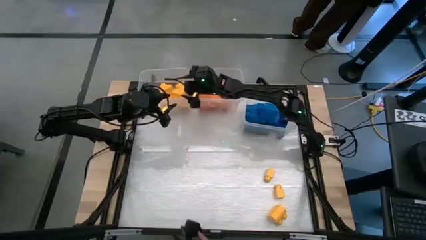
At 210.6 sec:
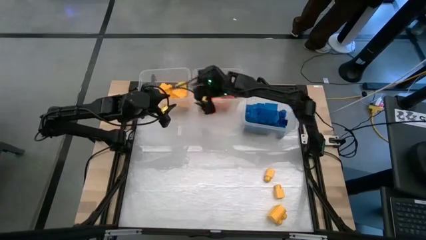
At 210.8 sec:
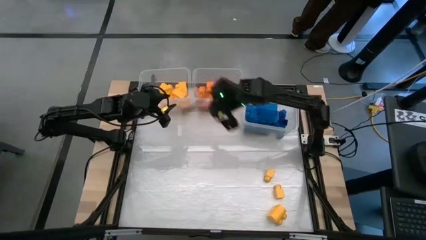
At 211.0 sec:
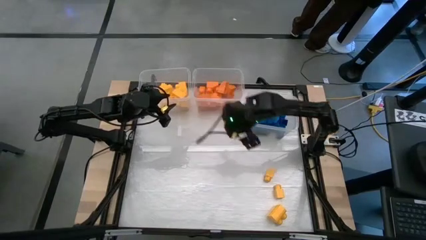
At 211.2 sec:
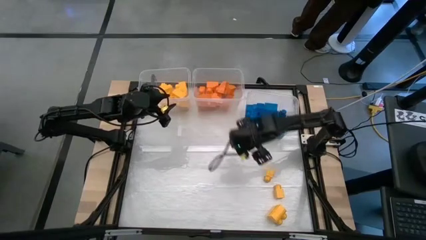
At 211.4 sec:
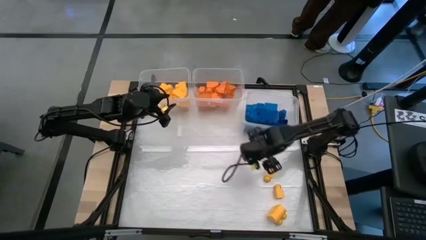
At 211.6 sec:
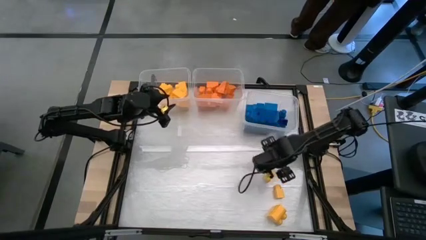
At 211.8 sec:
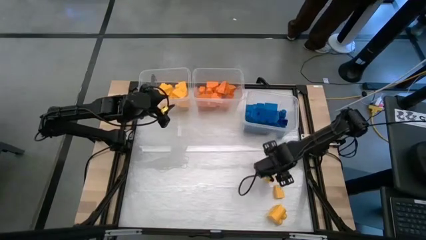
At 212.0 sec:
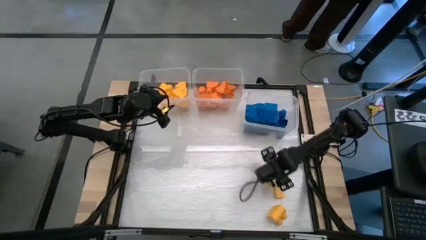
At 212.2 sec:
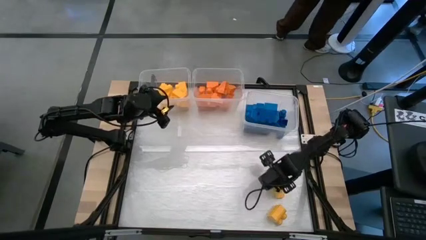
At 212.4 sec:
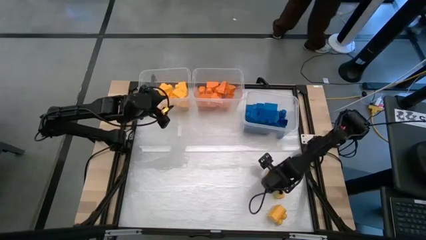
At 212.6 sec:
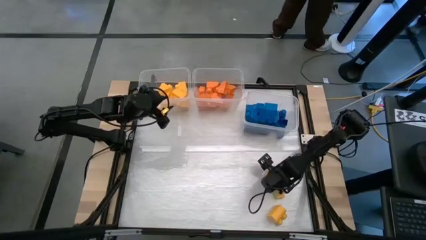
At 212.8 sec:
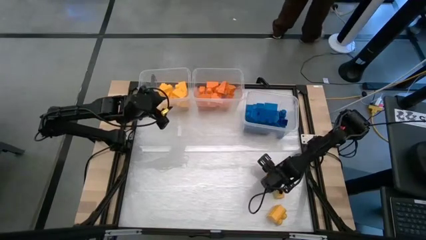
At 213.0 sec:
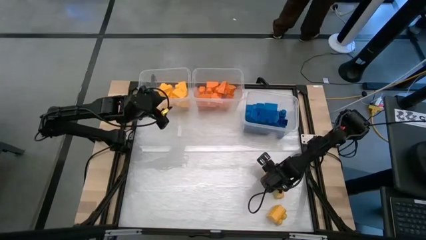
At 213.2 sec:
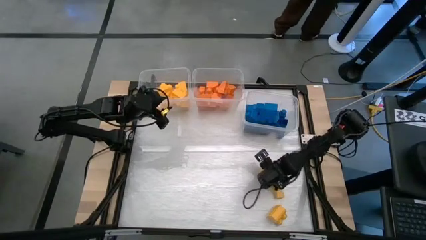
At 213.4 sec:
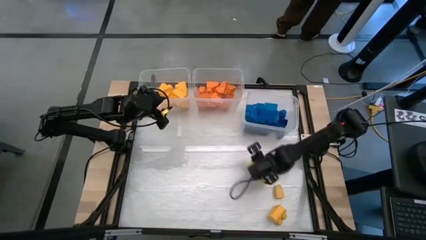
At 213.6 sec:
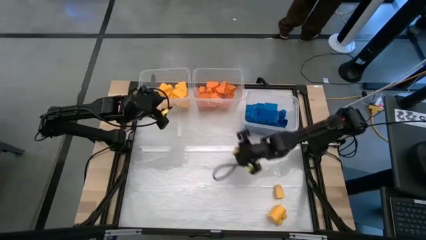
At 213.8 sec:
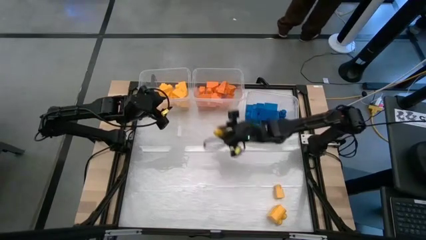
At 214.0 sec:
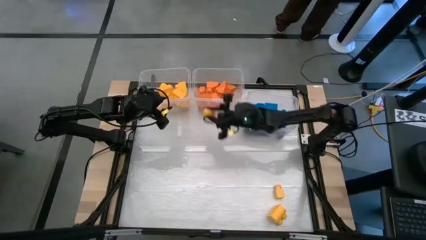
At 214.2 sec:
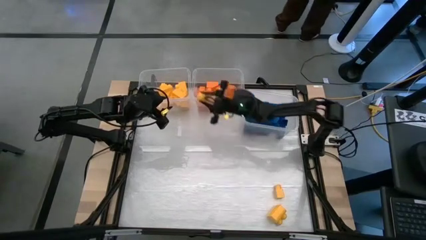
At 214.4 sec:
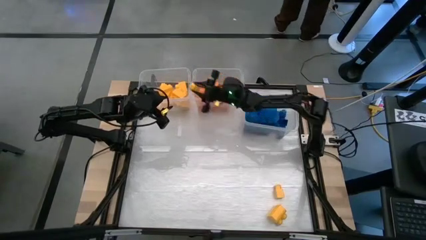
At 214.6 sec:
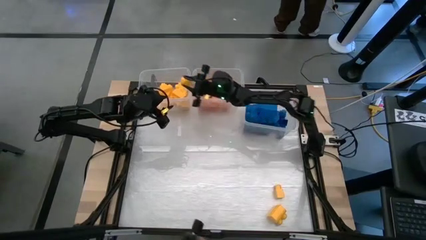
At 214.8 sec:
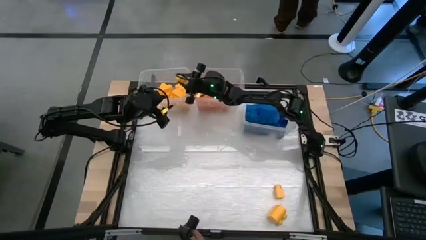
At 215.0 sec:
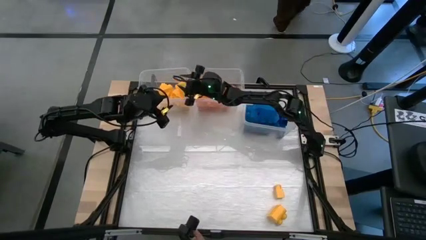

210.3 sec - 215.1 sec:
Task: Sort blocks
Put the yellow game piece into the left transparent bin

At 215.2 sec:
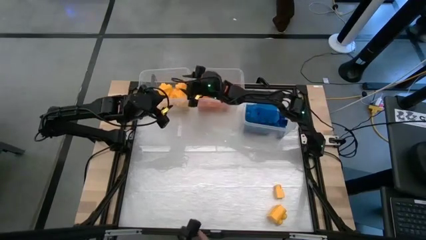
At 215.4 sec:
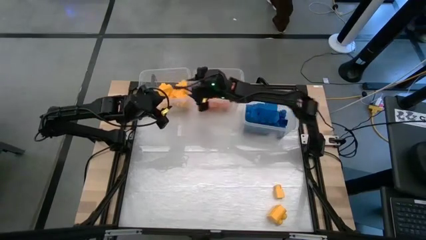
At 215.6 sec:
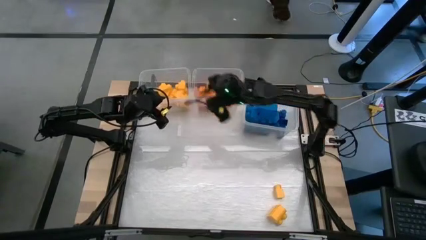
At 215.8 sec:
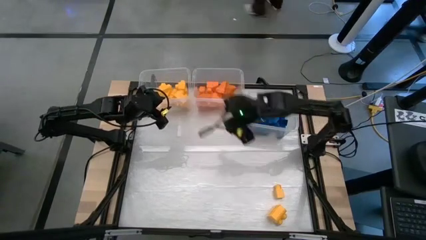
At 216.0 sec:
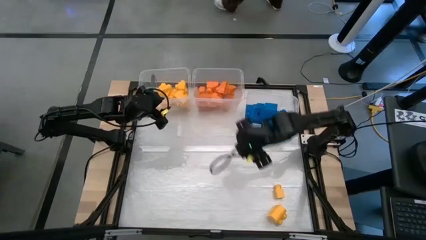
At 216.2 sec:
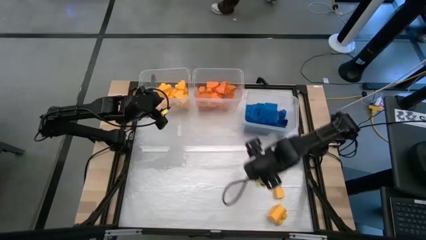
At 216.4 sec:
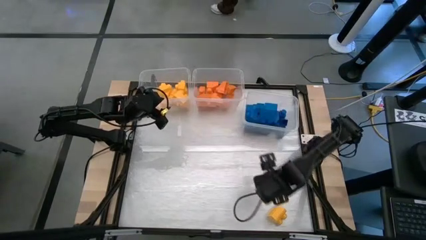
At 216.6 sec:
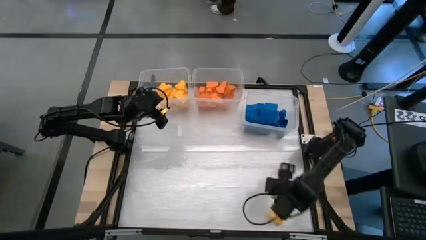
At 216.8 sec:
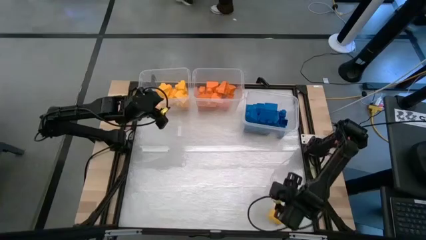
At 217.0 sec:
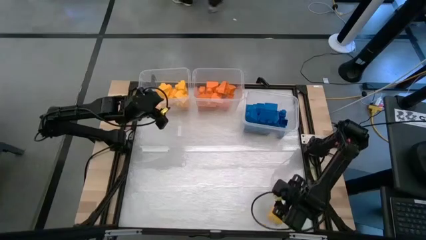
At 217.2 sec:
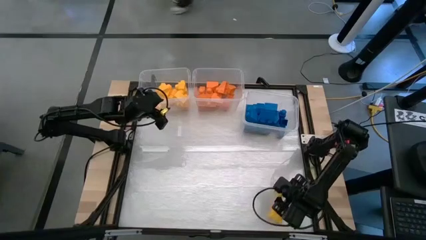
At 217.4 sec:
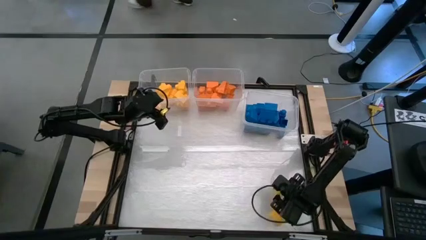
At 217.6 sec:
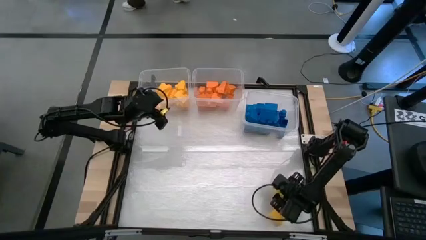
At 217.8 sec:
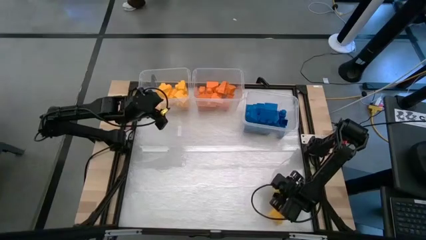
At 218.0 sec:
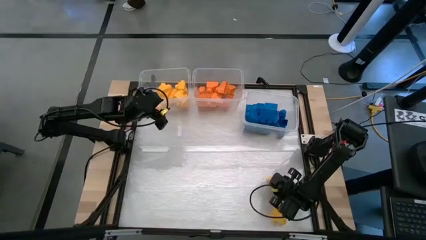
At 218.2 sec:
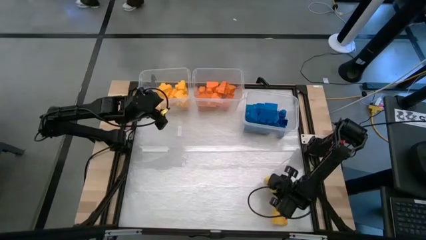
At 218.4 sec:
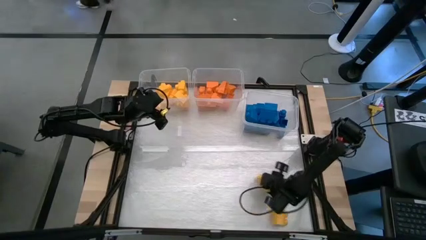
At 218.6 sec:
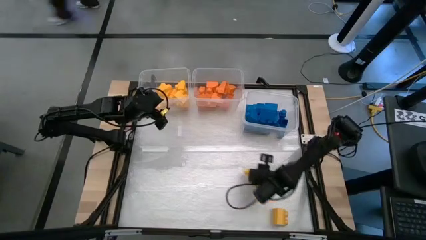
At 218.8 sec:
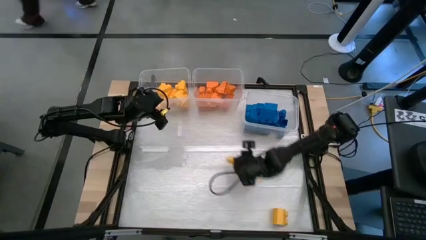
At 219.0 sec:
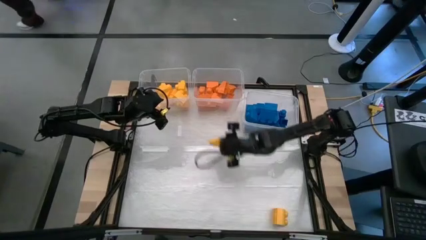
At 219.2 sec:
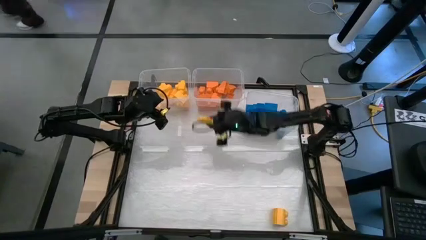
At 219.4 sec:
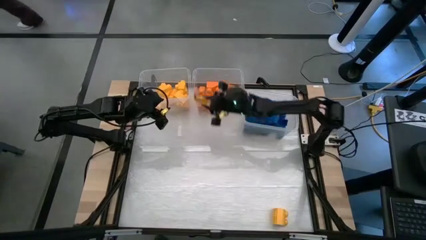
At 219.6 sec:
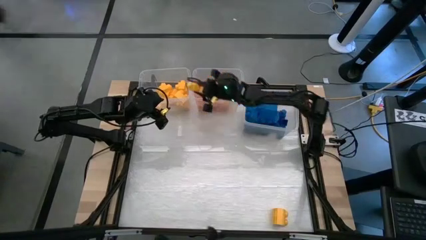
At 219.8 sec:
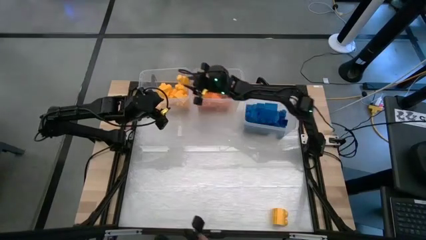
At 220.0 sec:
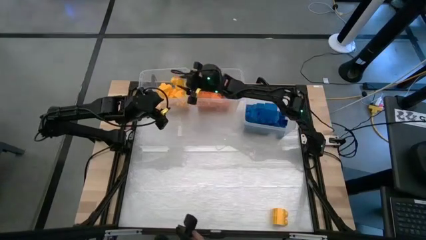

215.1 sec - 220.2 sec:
Put the yellow game piece into the left transparent bin

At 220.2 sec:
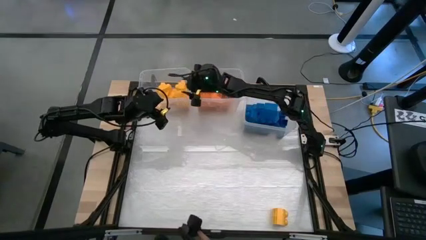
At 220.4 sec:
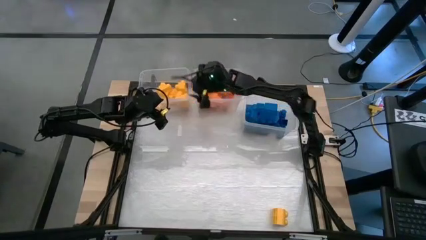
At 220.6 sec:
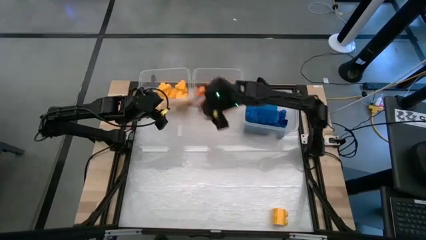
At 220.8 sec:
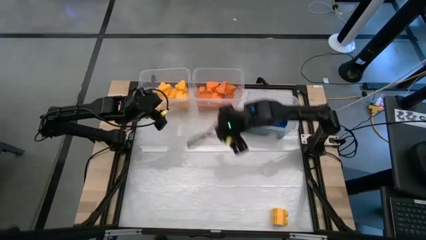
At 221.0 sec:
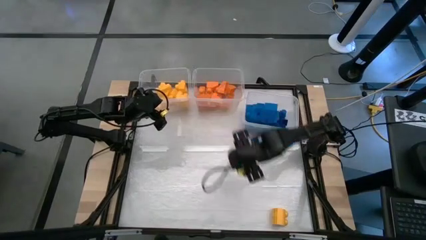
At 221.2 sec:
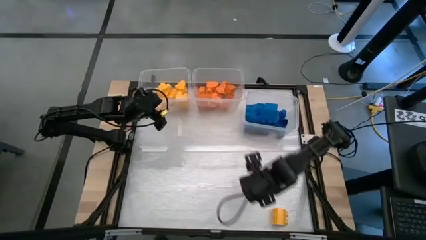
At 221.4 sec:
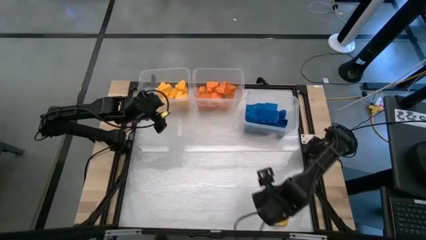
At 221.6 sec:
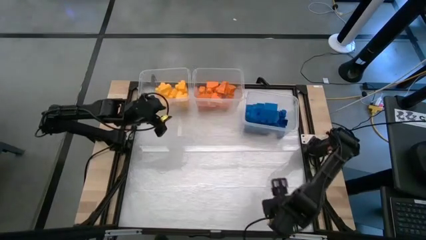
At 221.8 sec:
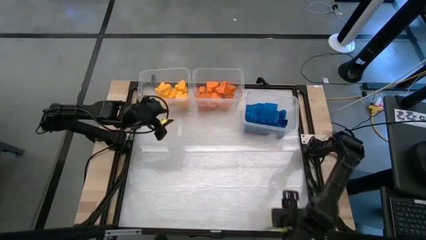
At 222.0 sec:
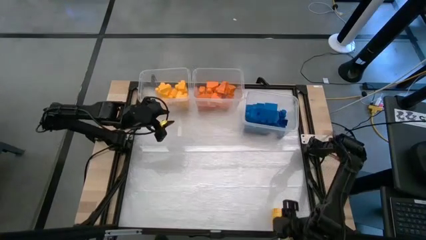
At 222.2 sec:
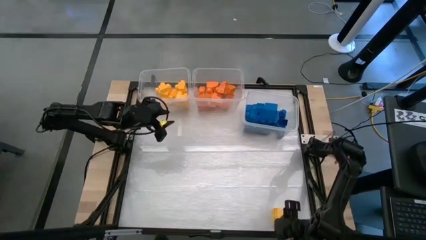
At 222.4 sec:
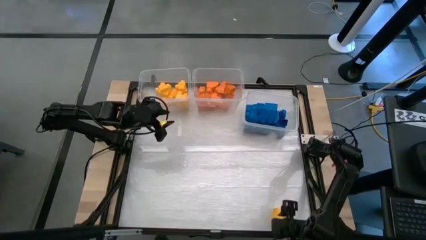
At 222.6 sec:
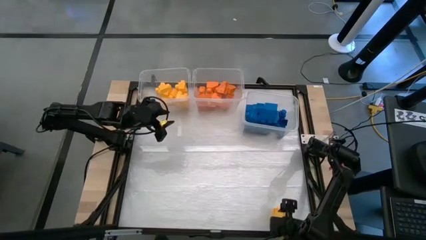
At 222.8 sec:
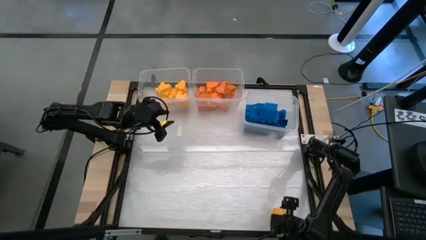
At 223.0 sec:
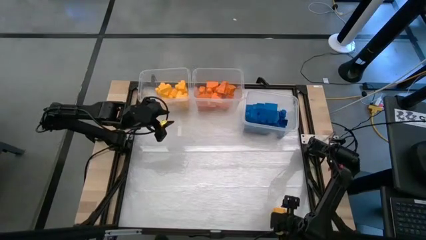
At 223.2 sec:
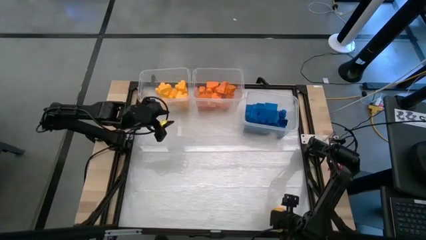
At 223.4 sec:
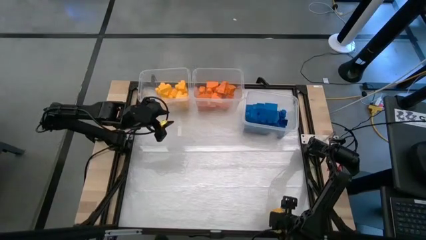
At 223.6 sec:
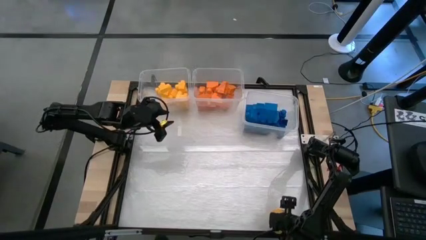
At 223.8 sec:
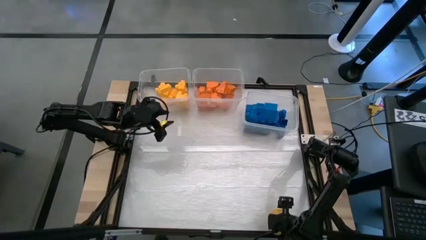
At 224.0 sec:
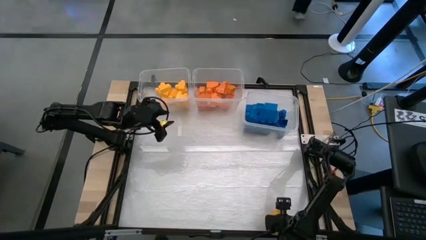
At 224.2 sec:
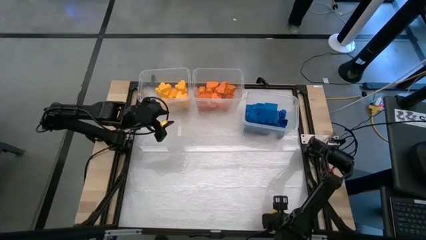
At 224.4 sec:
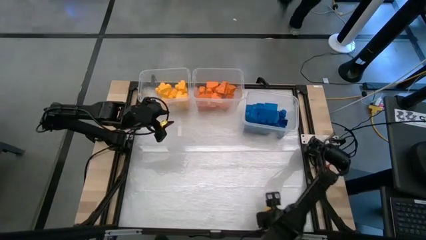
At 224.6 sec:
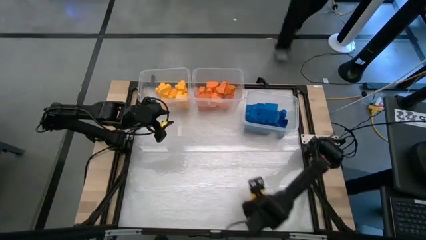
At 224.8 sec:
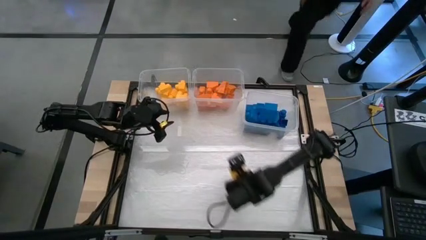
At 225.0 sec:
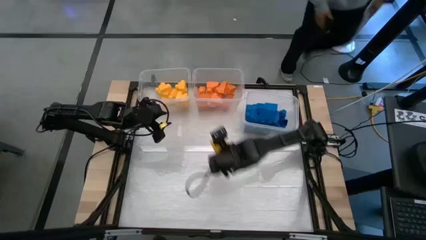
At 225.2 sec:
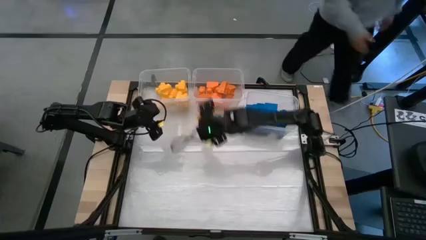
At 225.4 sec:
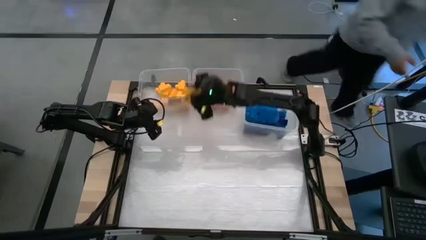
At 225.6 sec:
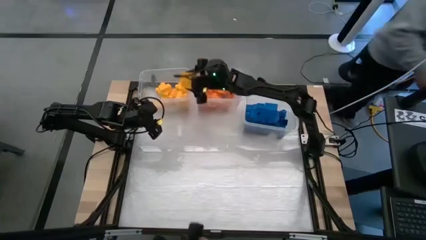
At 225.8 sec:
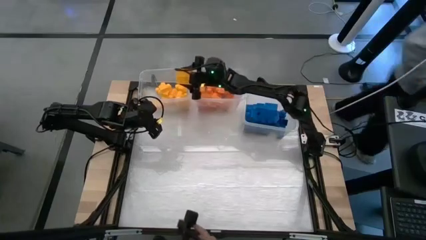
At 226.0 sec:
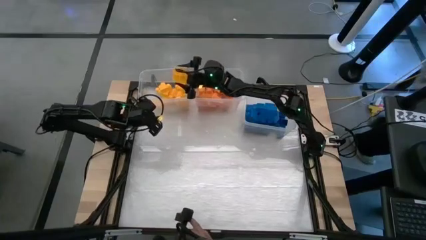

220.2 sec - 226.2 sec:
Put the yellow game piece into the left transparent bin
